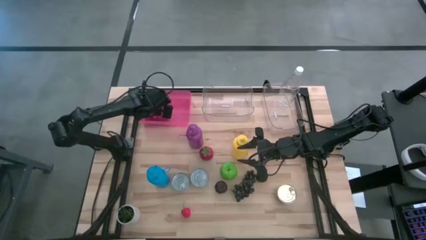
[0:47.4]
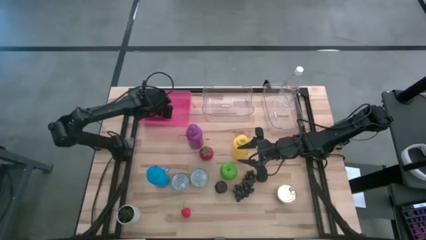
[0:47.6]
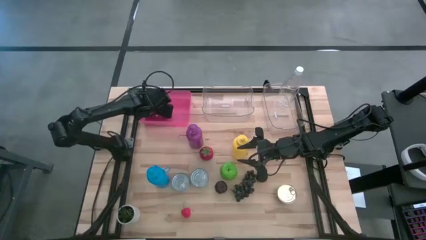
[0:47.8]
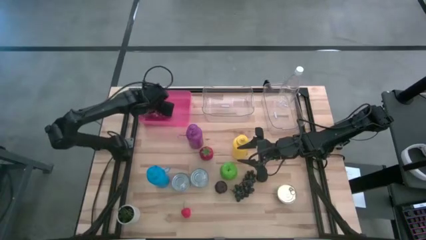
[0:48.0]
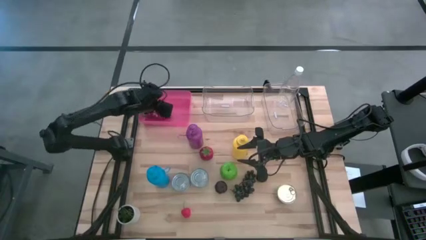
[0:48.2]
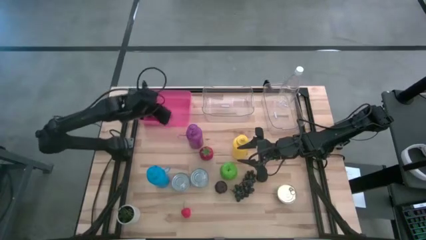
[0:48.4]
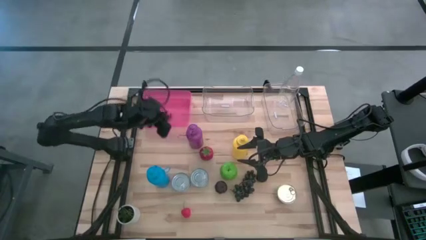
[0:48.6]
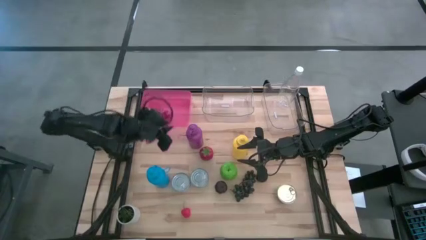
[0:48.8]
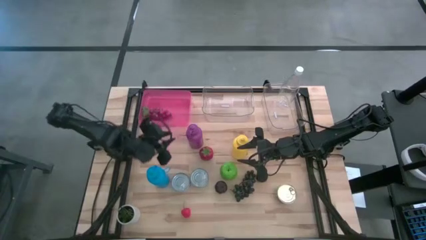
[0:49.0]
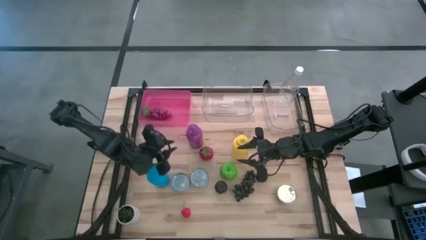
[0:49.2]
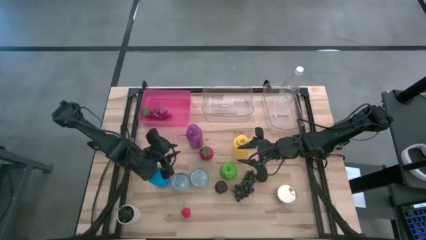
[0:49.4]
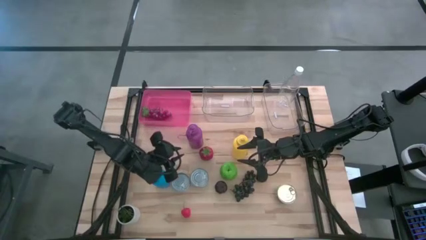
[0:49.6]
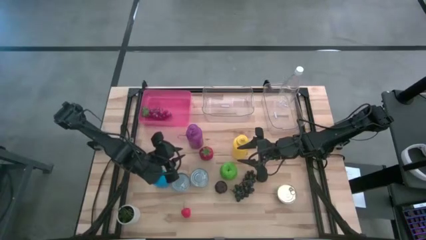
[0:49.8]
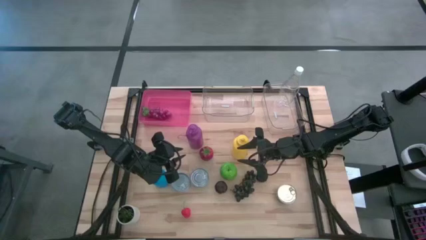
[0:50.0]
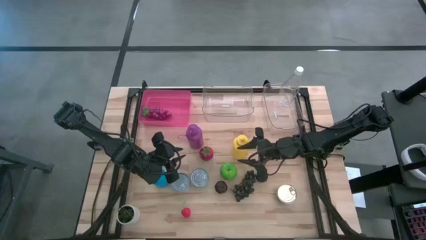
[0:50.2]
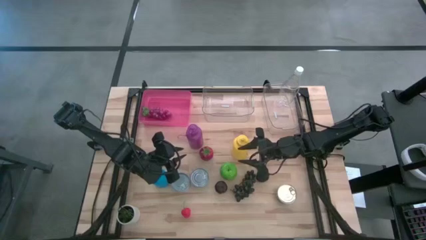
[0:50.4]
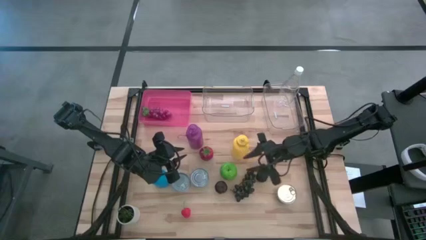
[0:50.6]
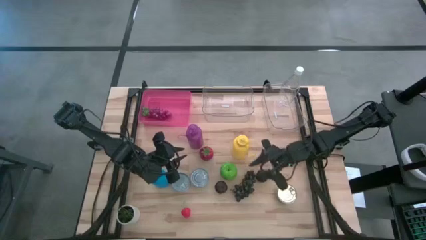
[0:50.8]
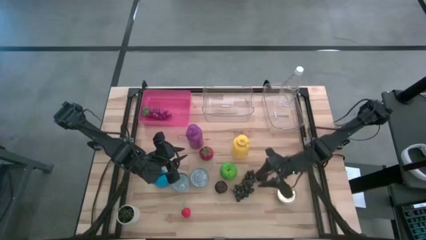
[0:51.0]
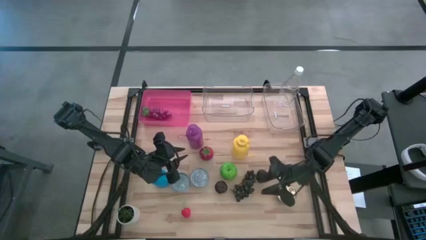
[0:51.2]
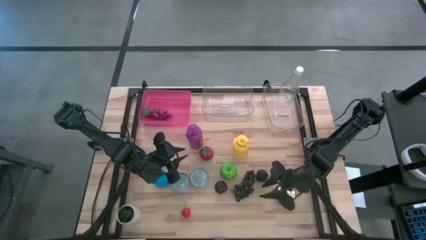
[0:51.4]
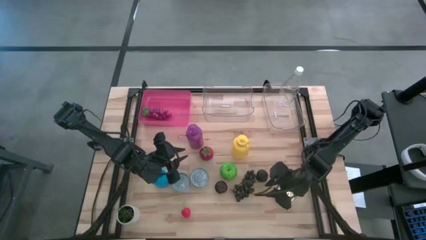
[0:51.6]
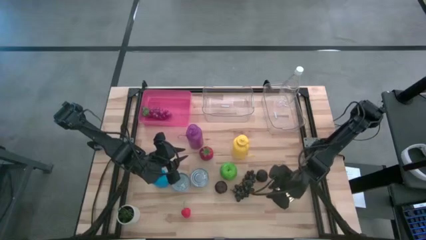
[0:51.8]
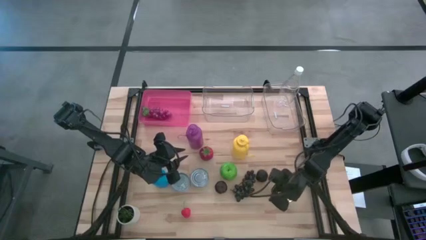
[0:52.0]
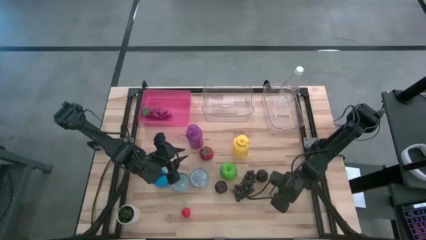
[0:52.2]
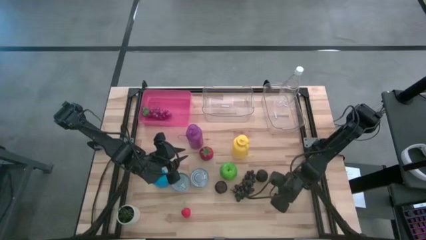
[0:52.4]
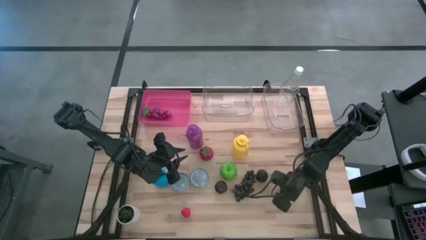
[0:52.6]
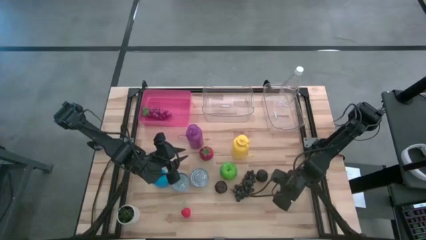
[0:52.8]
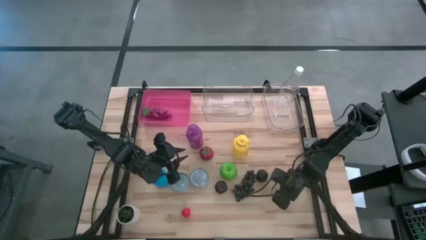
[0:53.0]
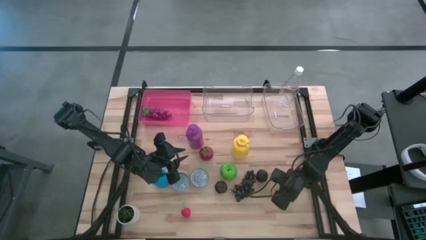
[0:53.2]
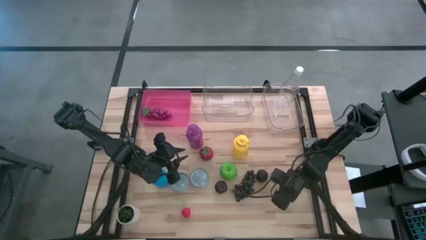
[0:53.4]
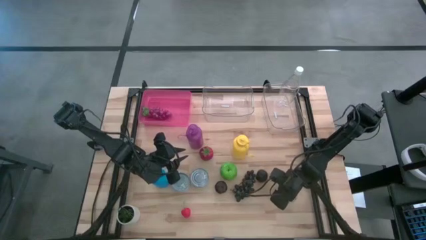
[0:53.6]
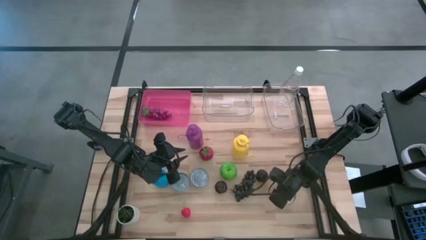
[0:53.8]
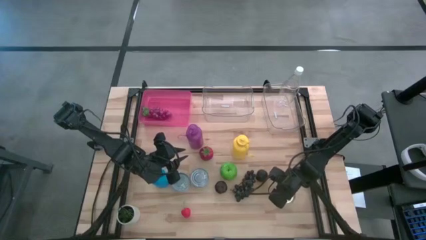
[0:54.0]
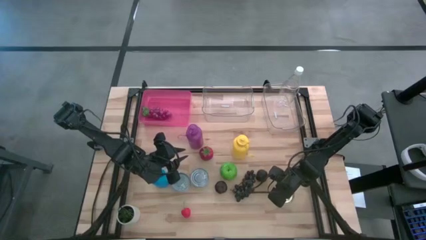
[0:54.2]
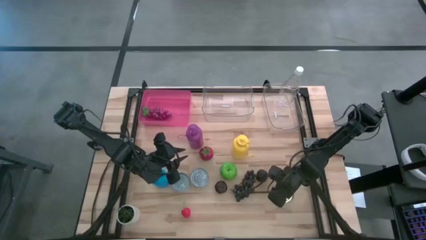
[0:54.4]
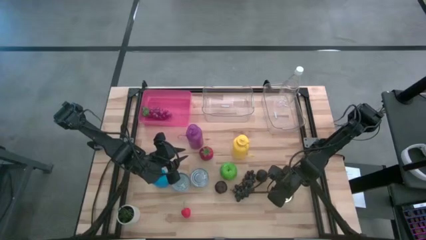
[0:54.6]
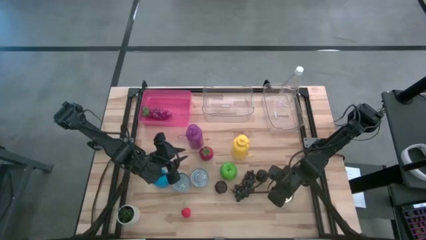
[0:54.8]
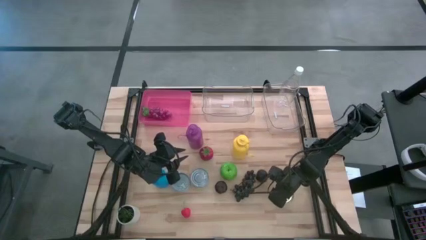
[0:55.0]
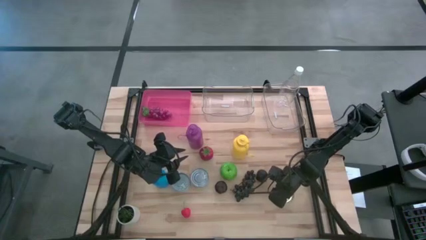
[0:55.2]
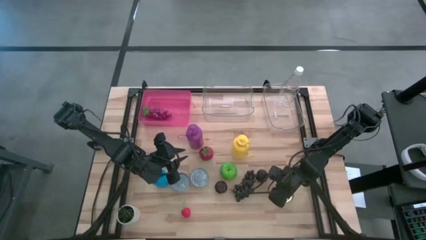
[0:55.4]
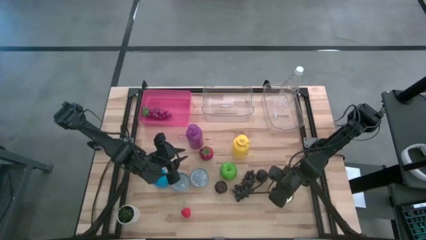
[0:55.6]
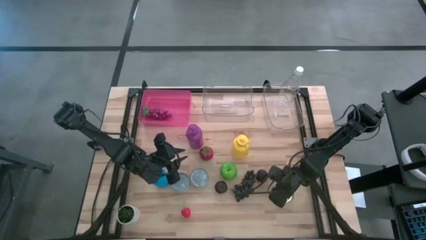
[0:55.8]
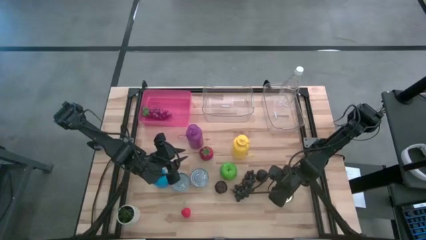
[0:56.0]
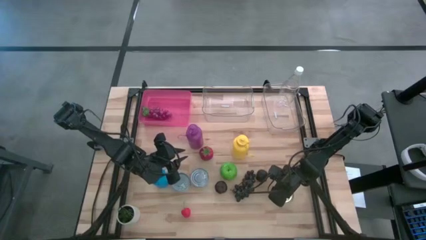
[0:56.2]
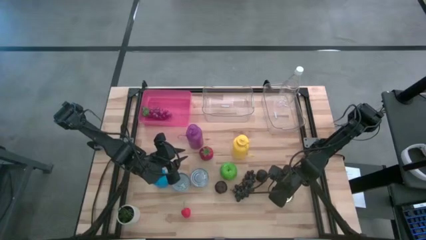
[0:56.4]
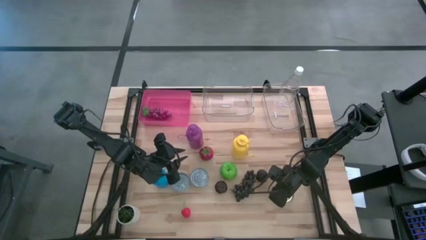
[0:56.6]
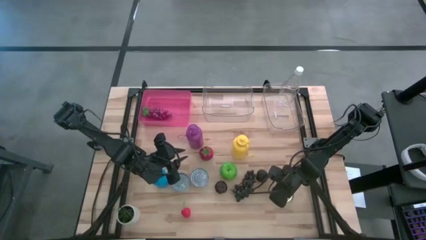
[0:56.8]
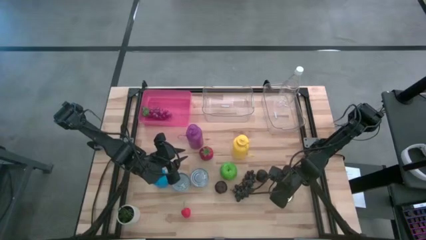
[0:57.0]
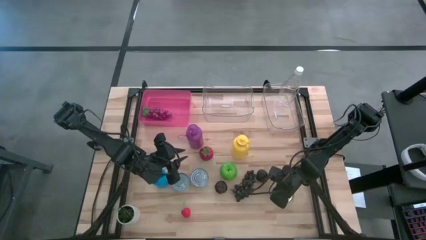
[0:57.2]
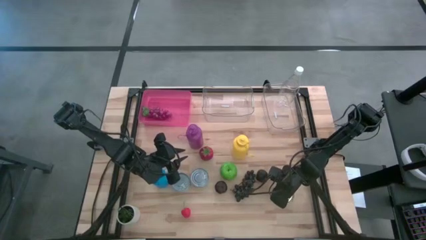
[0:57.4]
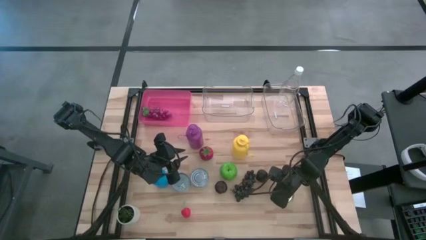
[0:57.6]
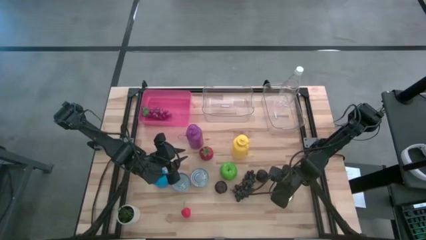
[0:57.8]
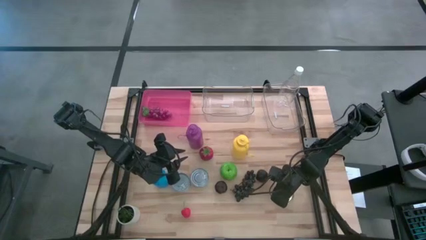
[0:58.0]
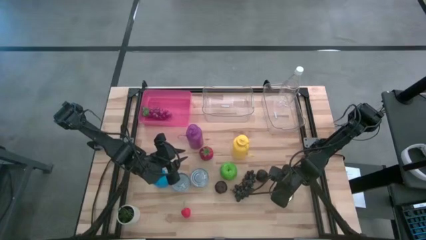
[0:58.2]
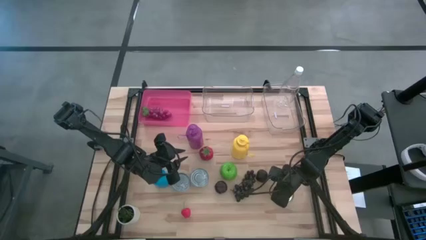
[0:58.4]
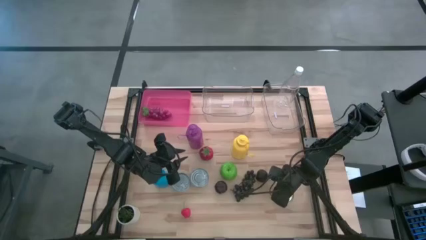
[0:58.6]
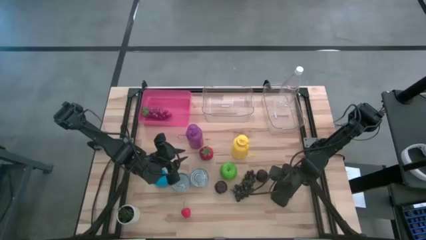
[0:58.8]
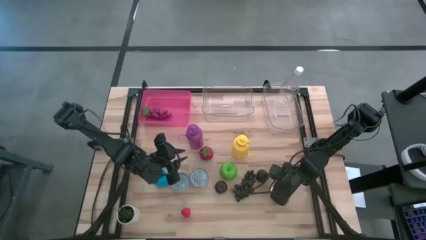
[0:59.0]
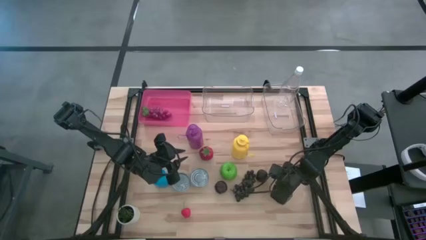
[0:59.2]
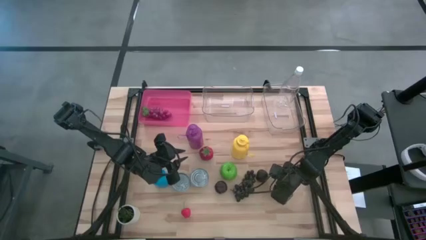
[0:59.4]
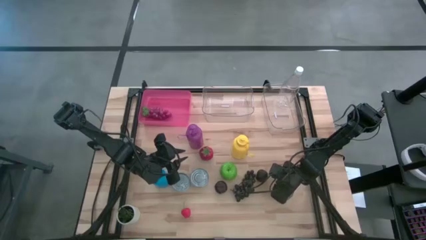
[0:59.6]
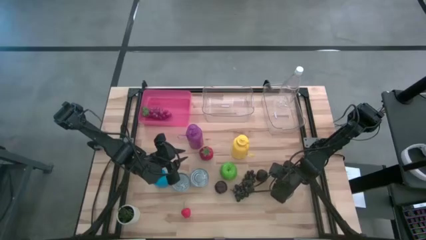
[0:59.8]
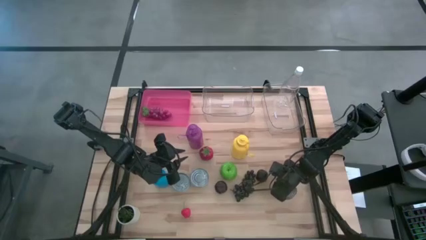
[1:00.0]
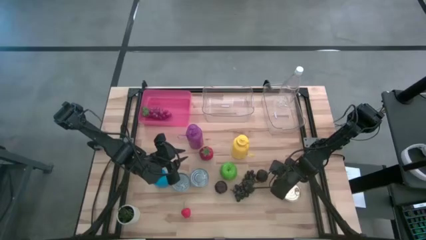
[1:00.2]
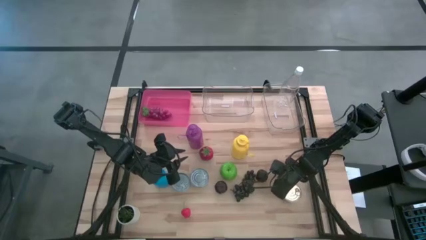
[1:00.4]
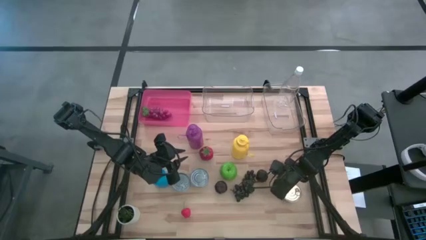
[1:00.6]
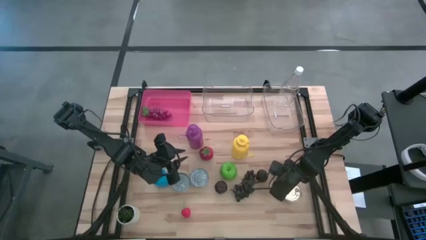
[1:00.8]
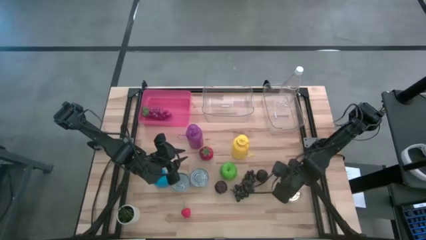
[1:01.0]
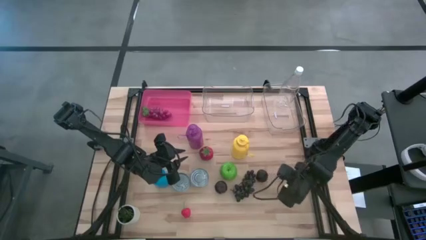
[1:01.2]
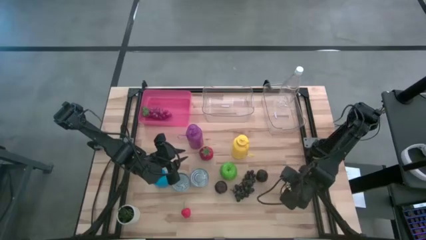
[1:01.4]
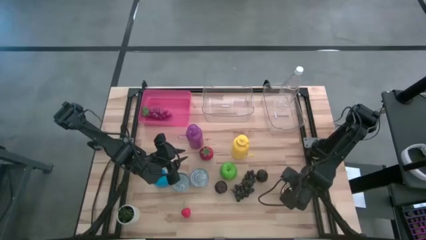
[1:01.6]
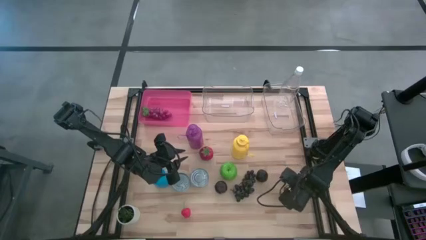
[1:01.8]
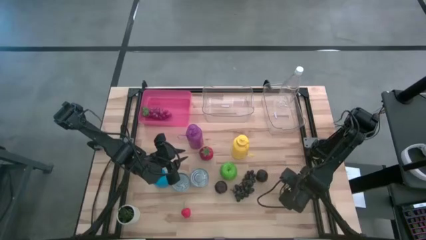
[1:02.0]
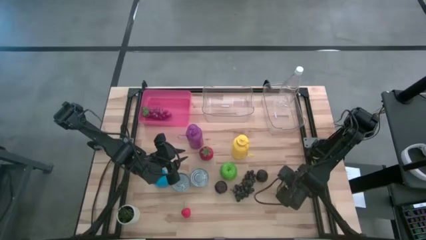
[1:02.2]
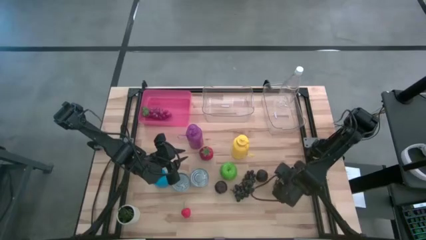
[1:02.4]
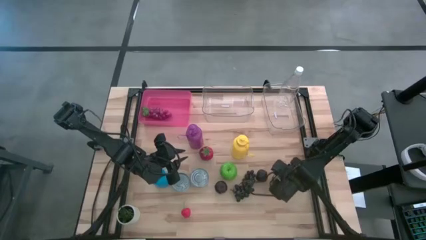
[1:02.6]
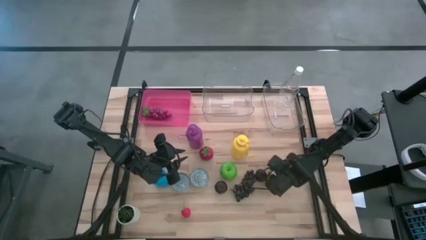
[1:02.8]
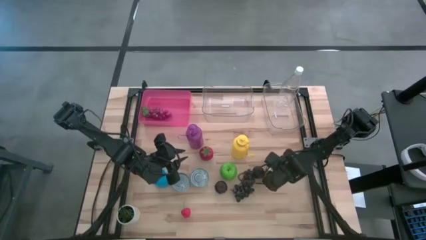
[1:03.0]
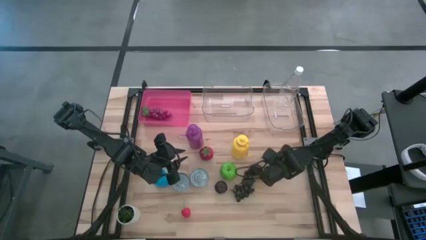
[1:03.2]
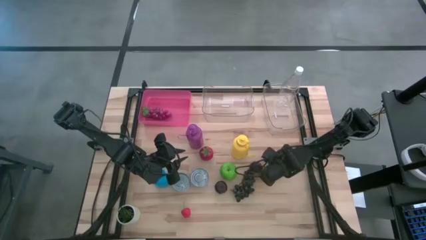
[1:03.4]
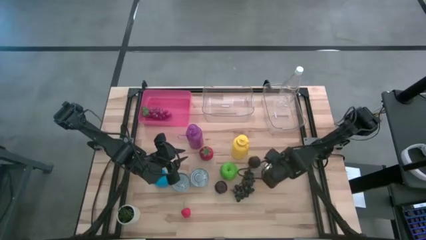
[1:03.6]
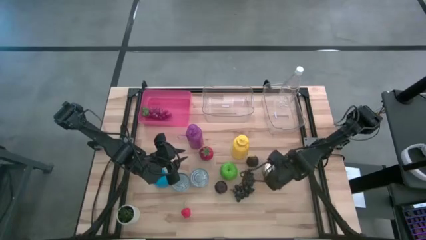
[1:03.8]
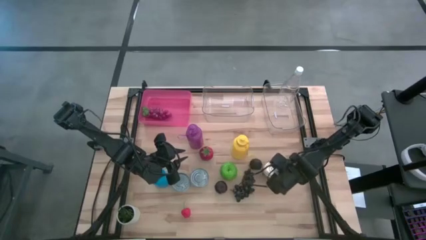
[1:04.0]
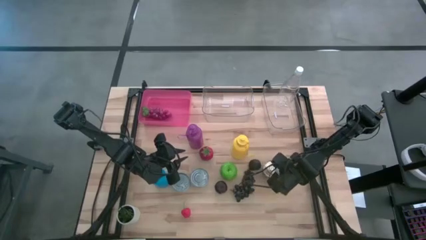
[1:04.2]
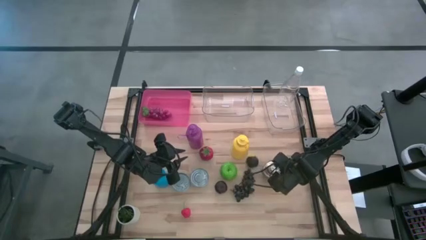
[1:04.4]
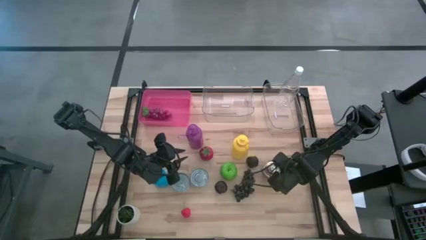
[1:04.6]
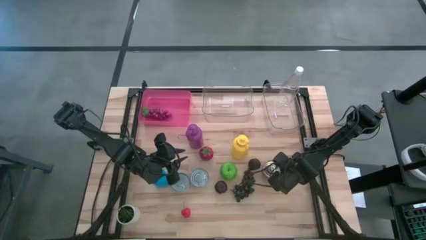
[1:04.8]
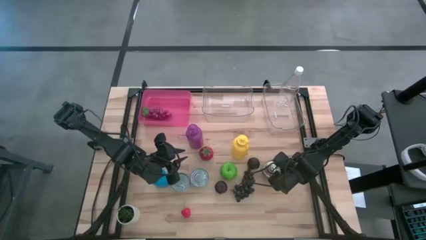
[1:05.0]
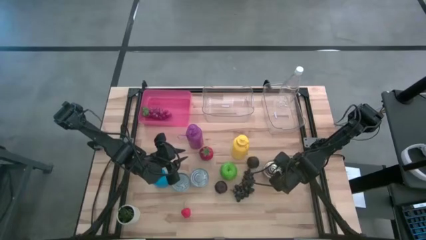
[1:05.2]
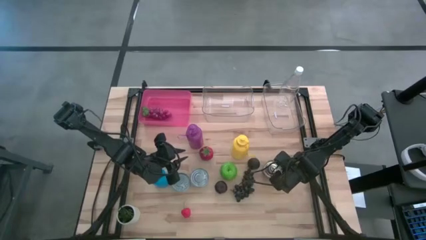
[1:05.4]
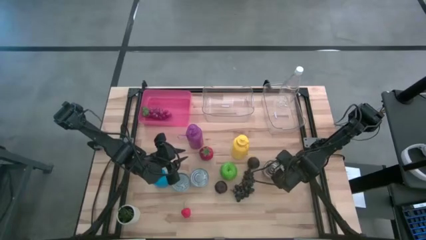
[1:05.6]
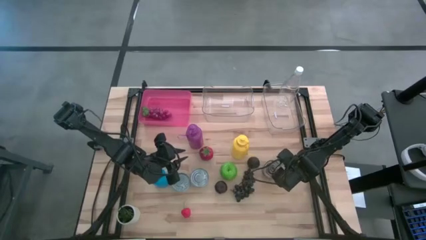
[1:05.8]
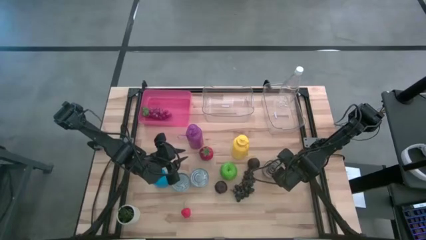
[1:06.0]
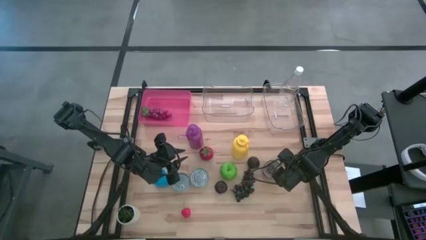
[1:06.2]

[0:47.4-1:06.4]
Task: Pick & Place Food Item
Put the blue and pink tuna can into the left transparent bin
